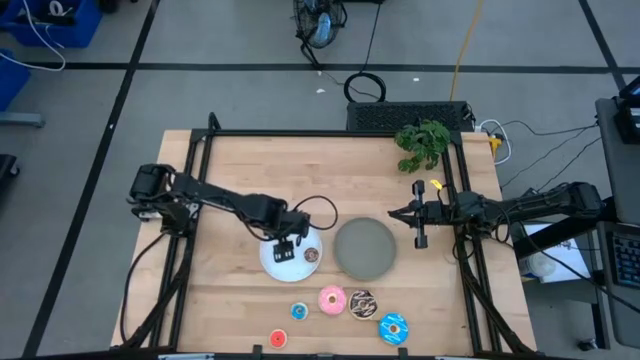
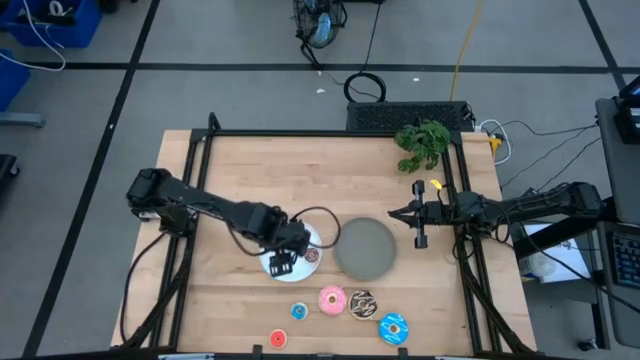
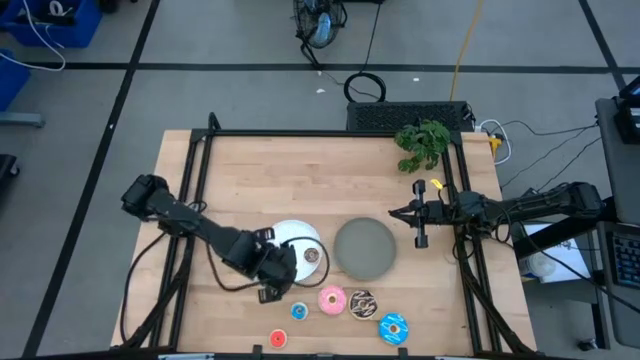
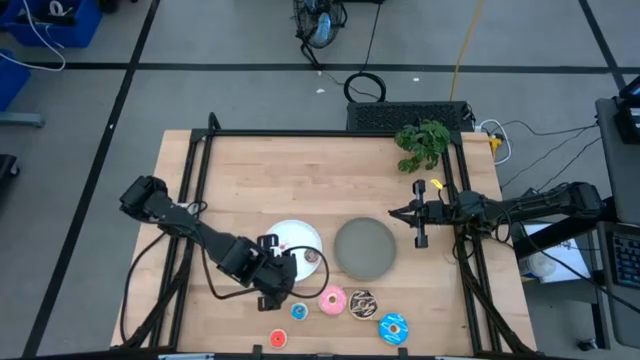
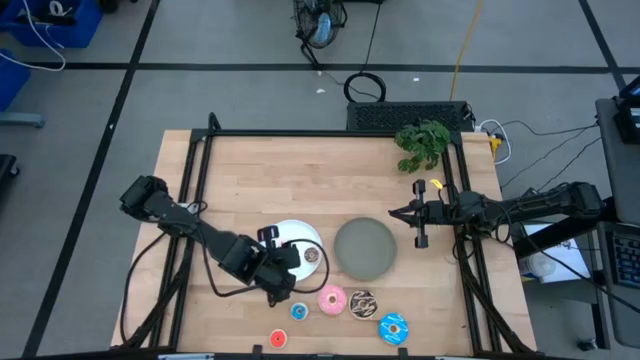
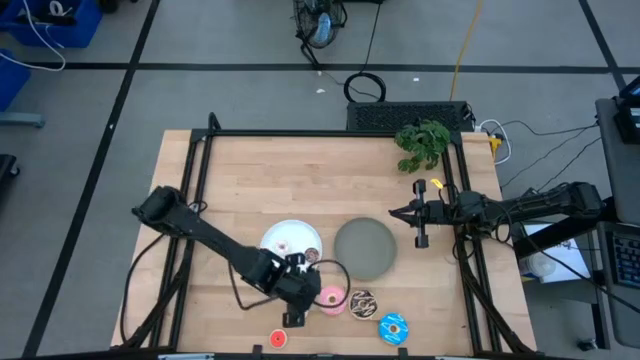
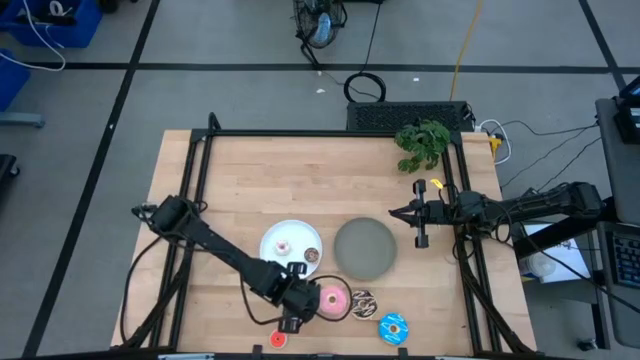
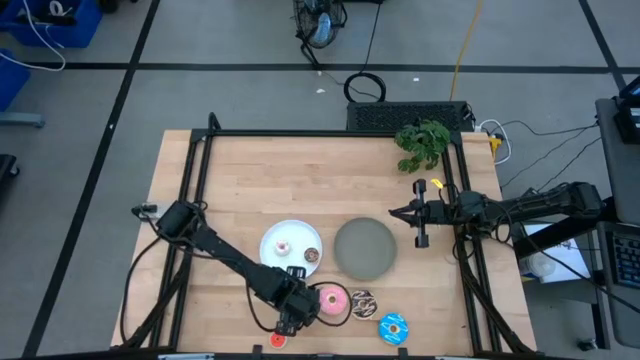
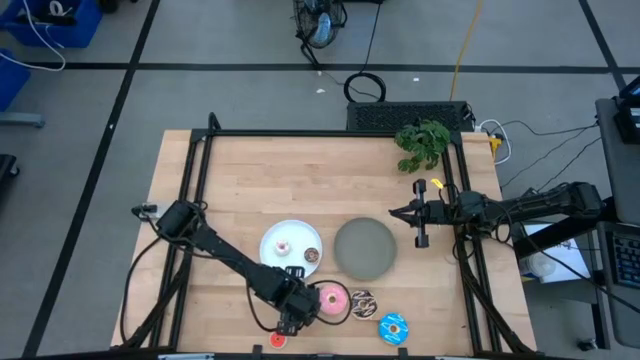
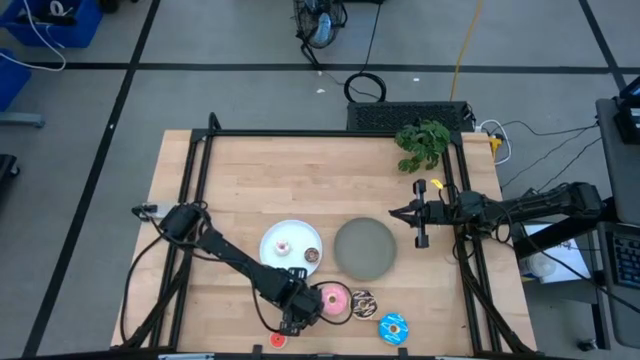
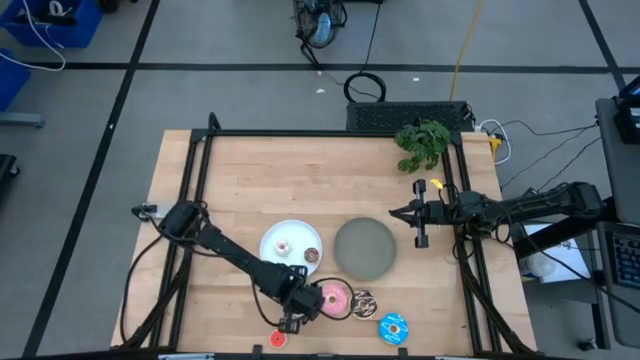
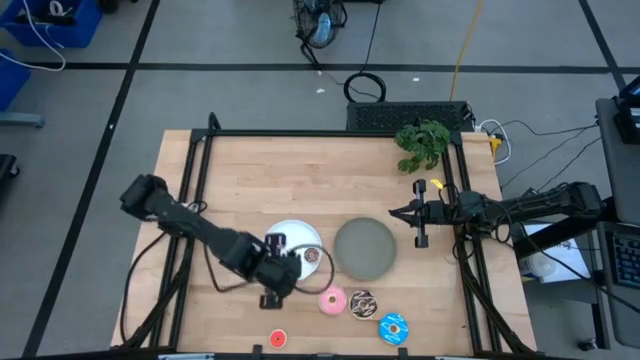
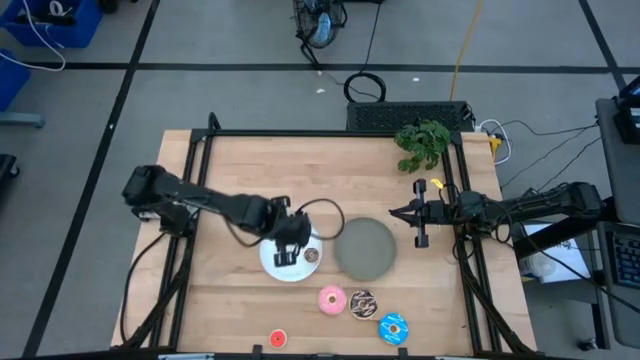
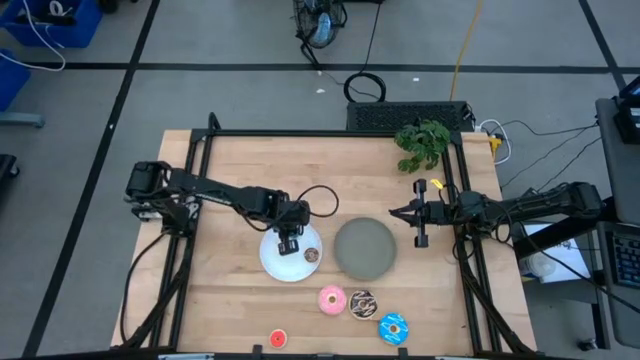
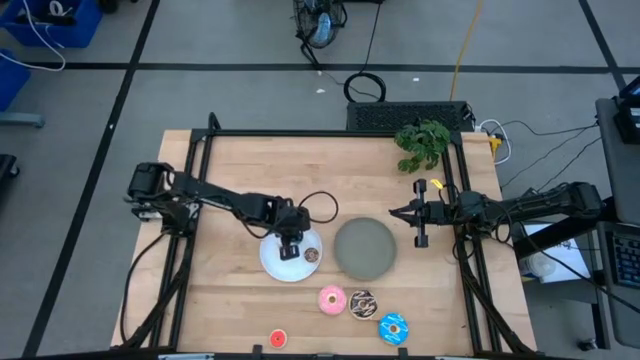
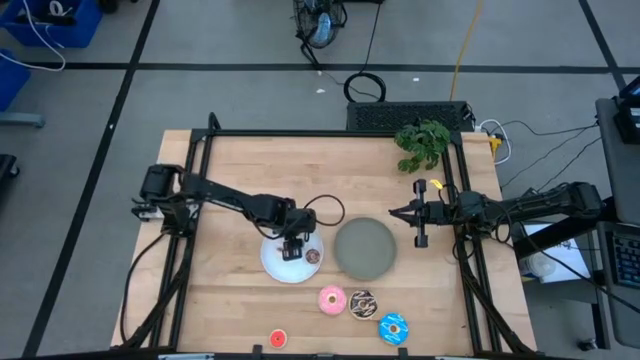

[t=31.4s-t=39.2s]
Task: Pick & Place donuts
Put the small blue donut on the white plate

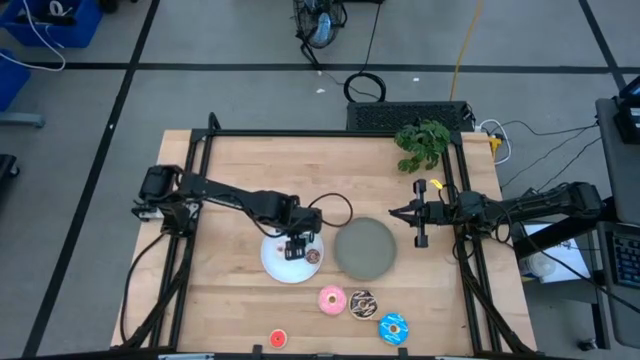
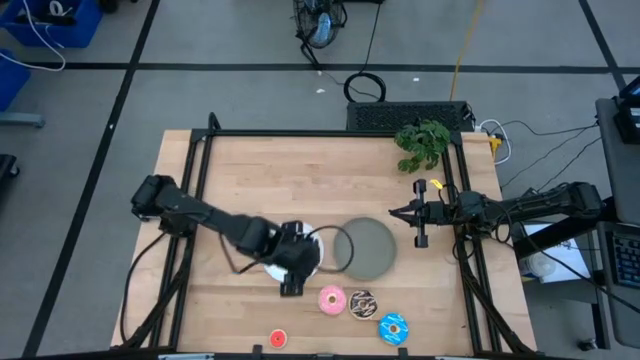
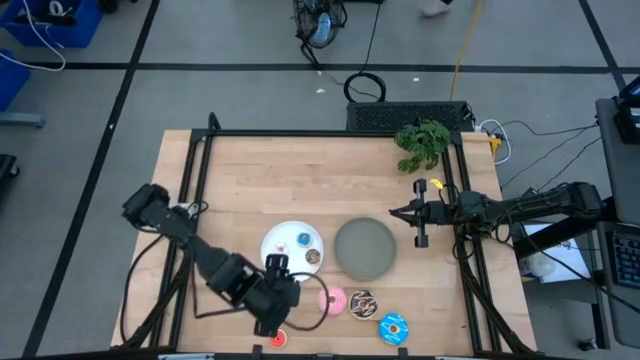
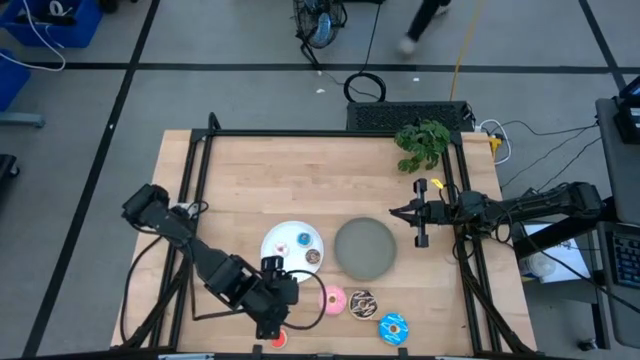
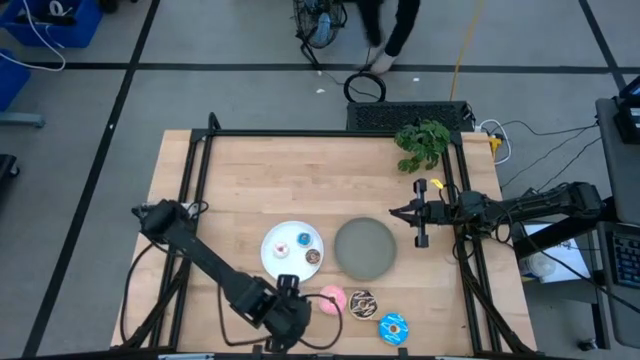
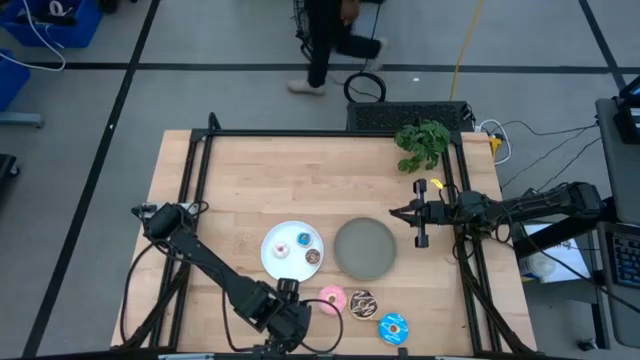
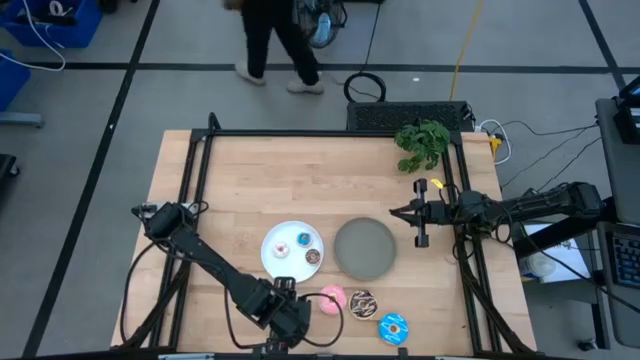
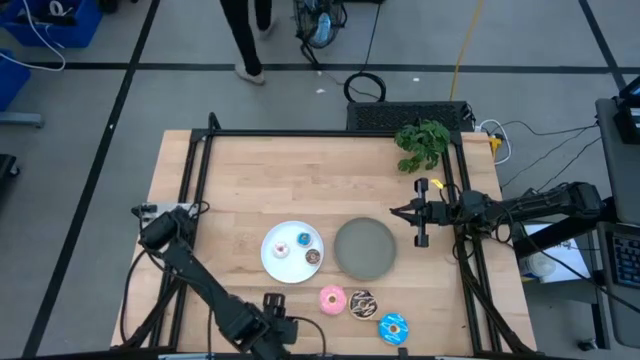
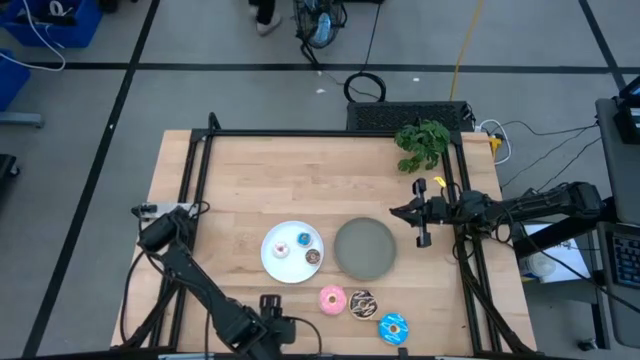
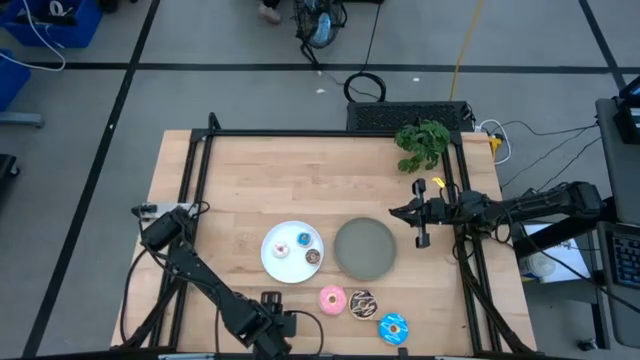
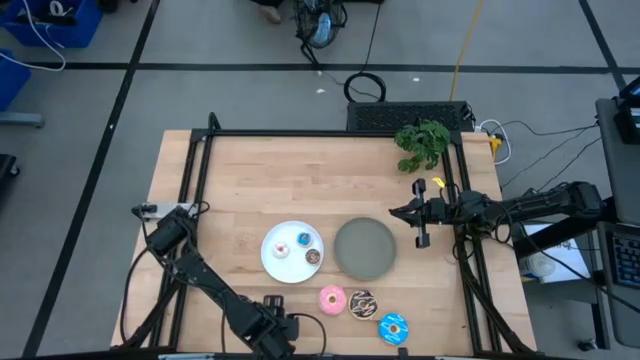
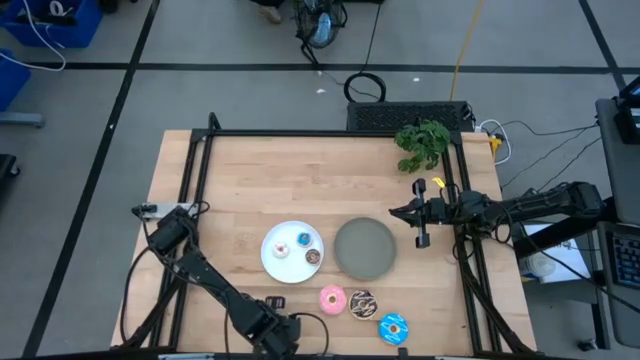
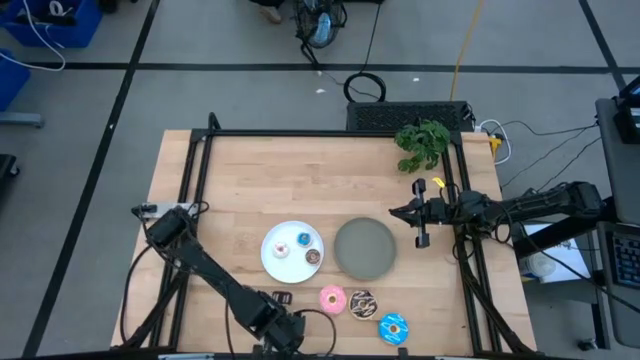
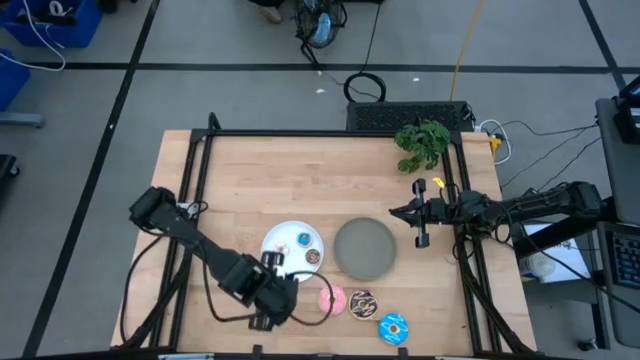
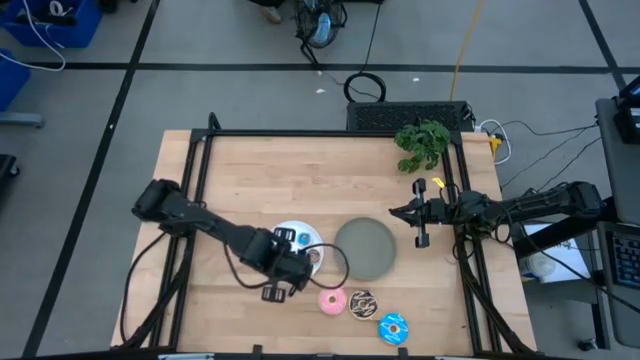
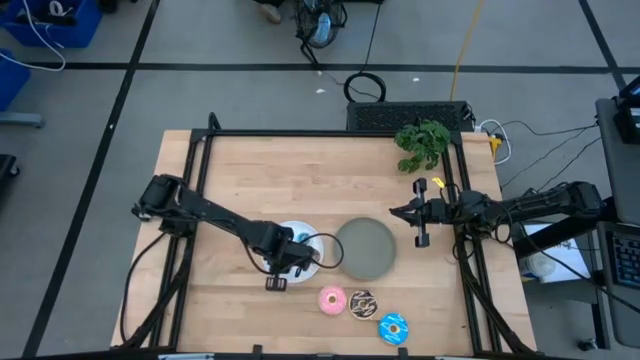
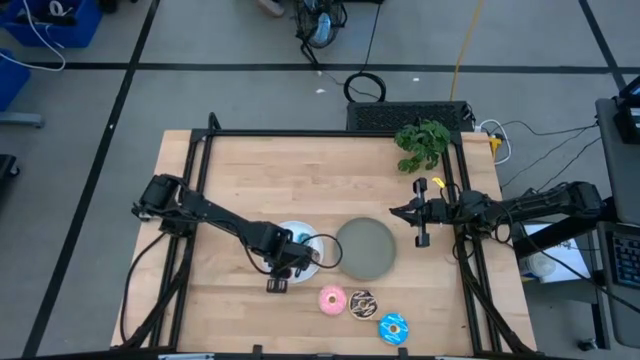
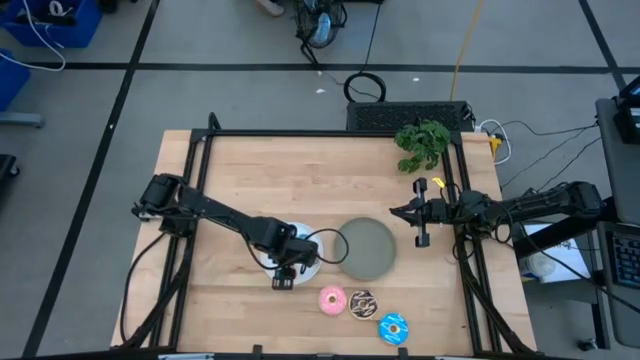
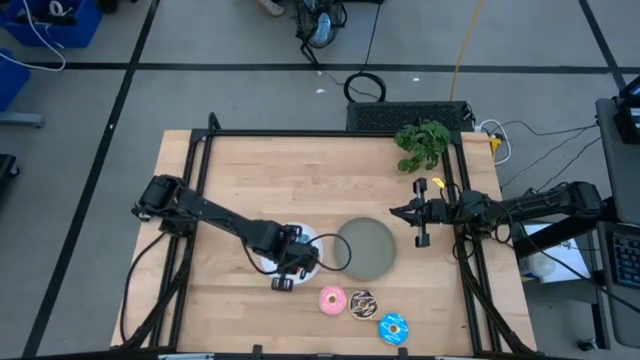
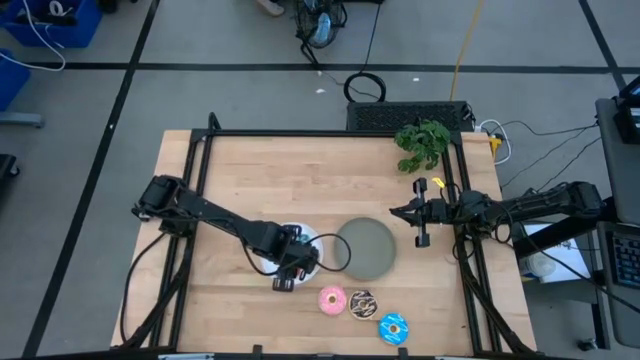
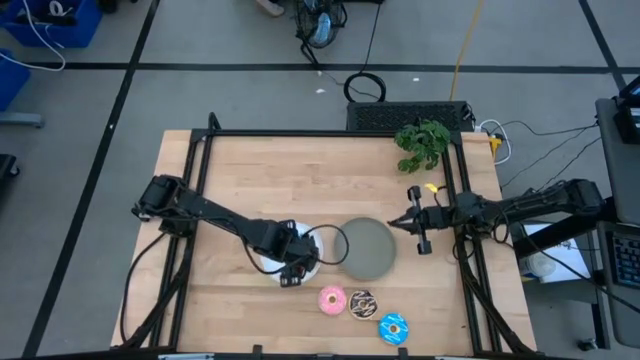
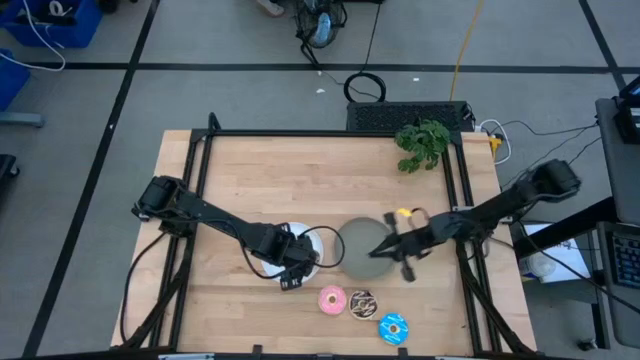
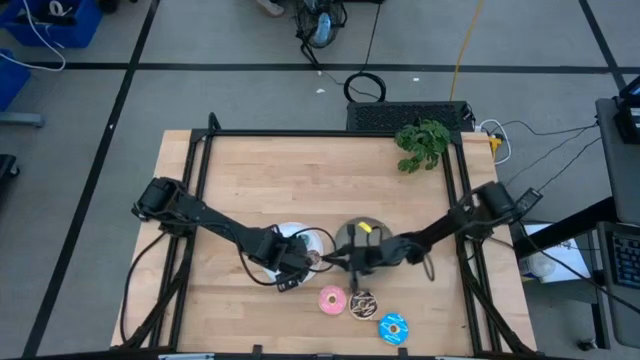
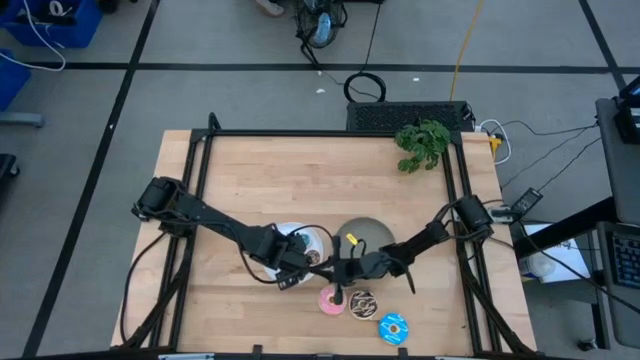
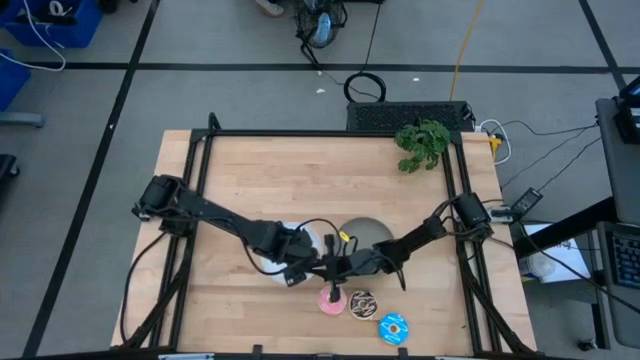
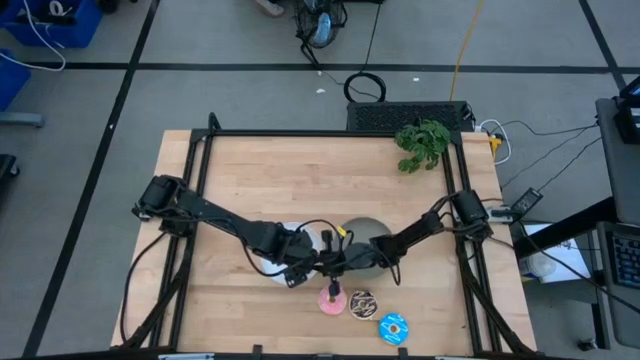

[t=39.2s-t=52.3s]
Put the small orange donut on the white plate
